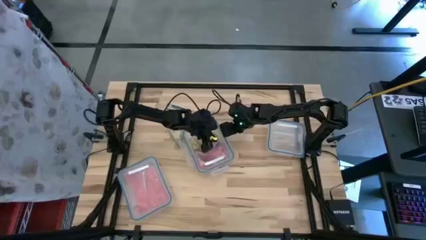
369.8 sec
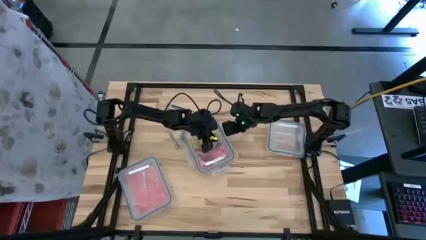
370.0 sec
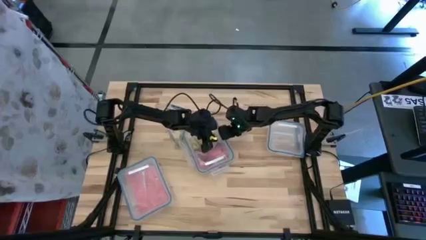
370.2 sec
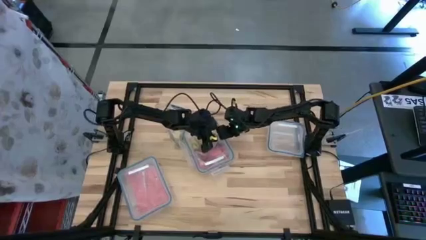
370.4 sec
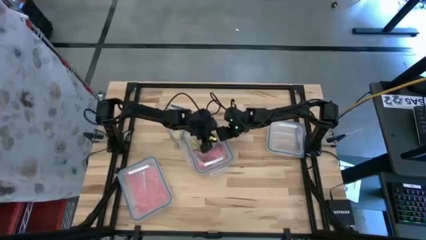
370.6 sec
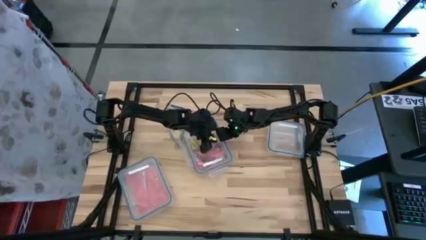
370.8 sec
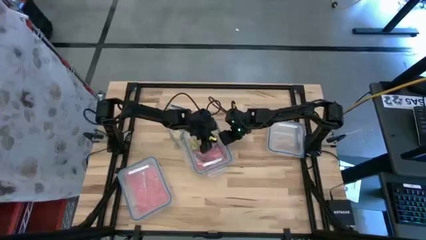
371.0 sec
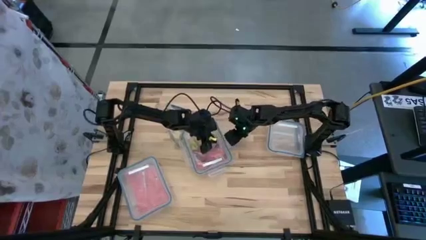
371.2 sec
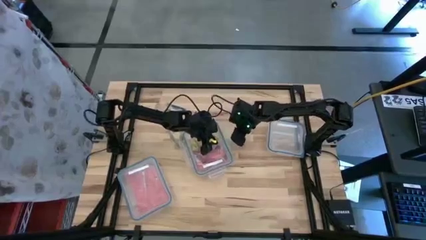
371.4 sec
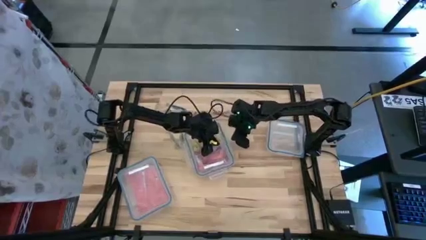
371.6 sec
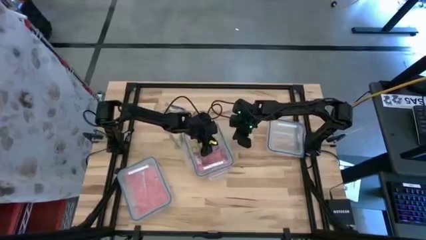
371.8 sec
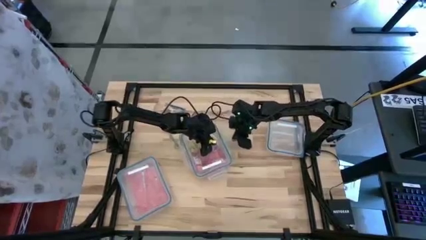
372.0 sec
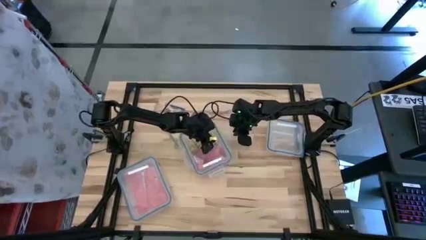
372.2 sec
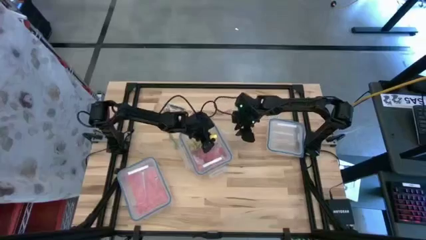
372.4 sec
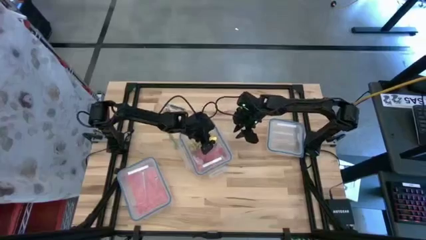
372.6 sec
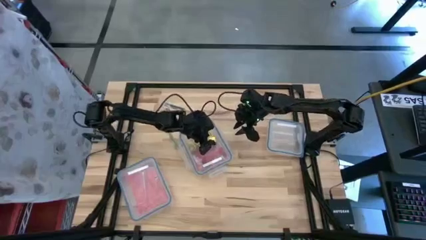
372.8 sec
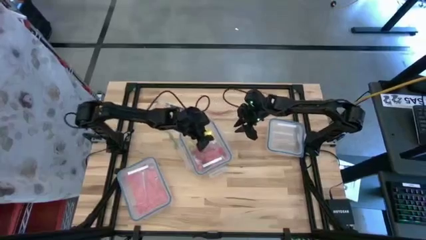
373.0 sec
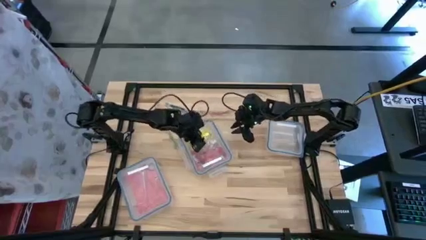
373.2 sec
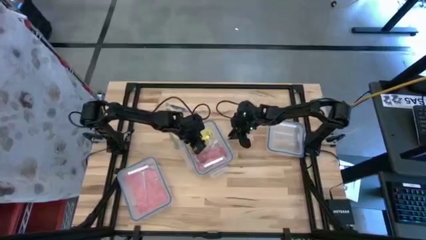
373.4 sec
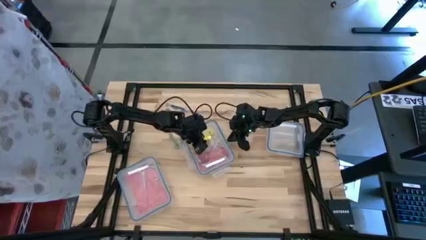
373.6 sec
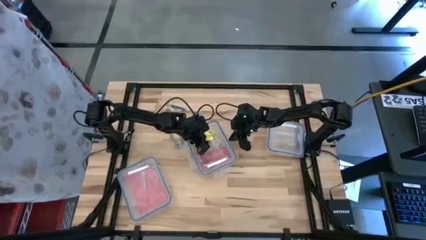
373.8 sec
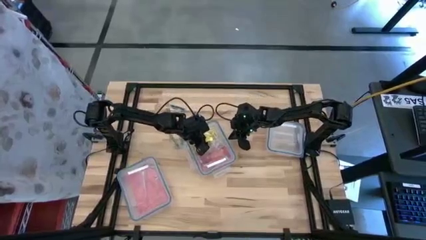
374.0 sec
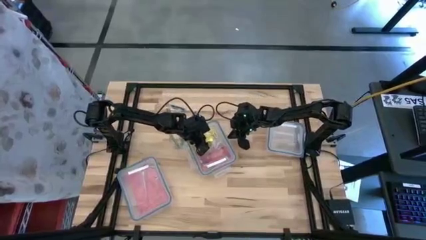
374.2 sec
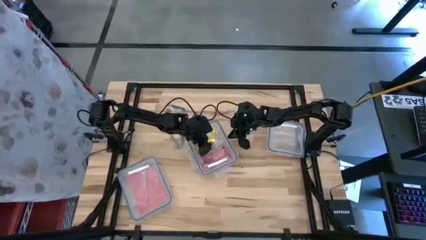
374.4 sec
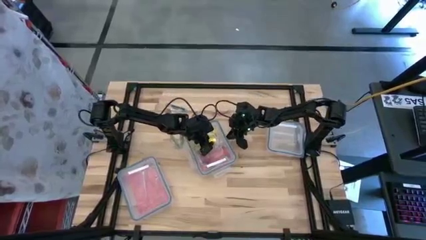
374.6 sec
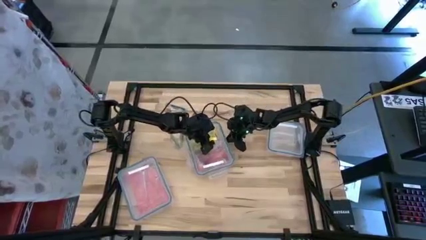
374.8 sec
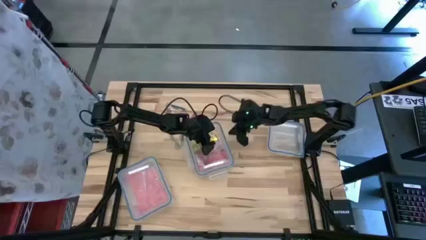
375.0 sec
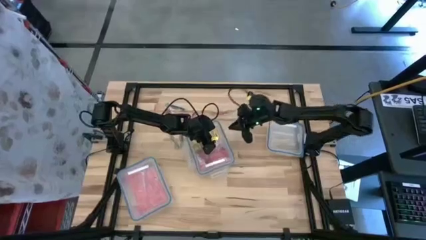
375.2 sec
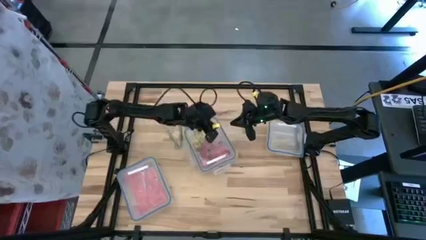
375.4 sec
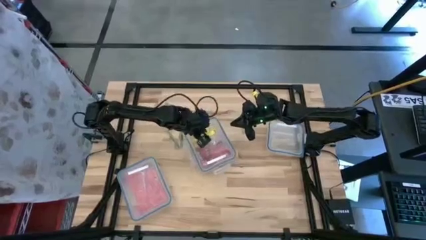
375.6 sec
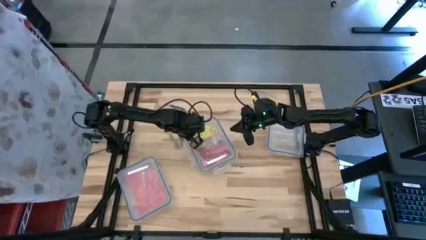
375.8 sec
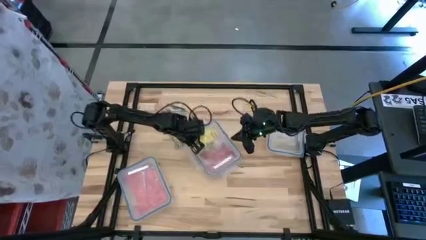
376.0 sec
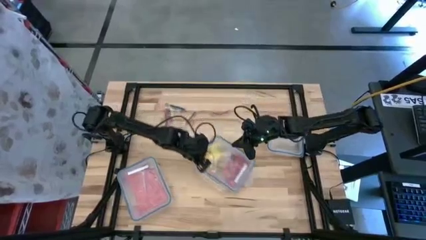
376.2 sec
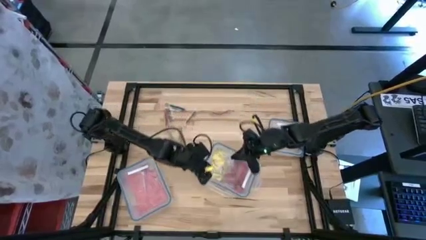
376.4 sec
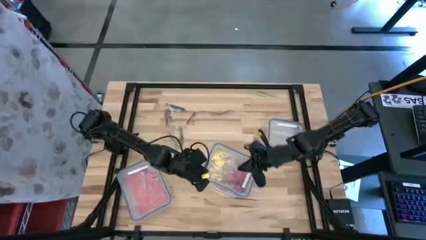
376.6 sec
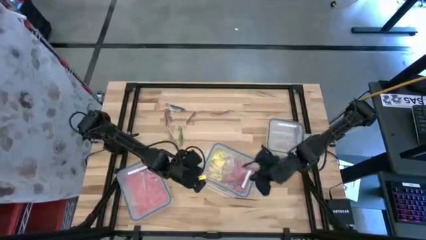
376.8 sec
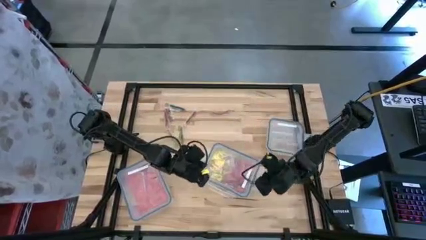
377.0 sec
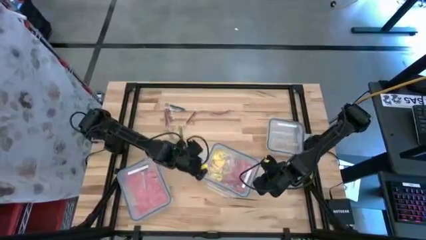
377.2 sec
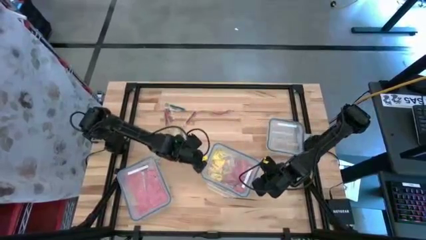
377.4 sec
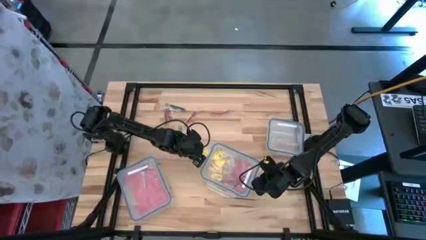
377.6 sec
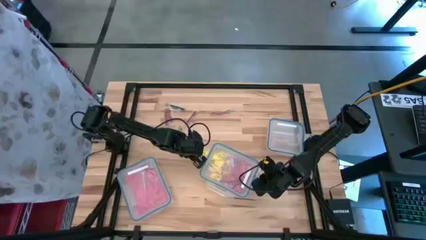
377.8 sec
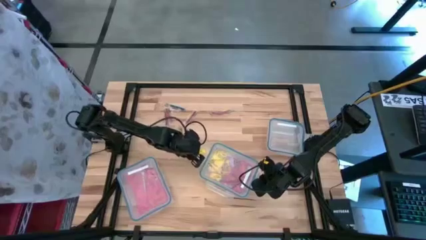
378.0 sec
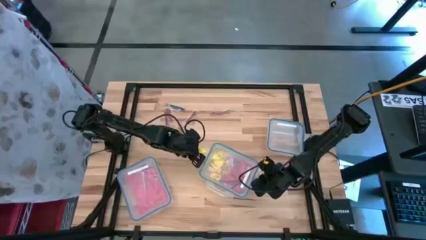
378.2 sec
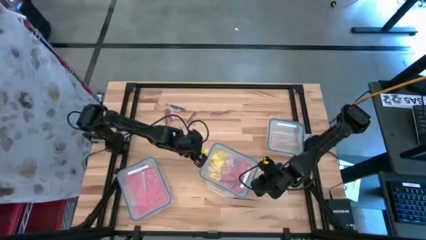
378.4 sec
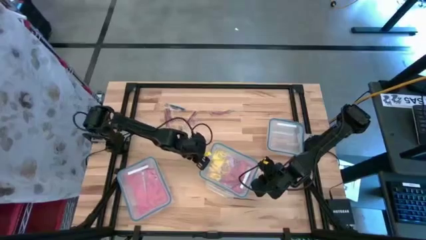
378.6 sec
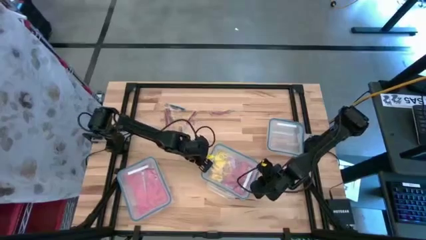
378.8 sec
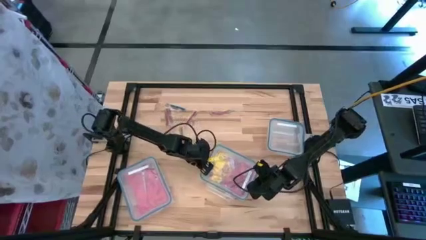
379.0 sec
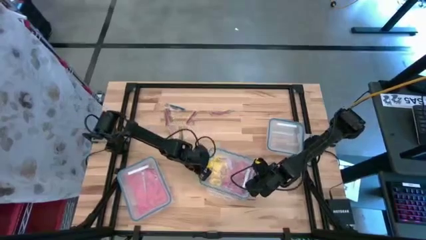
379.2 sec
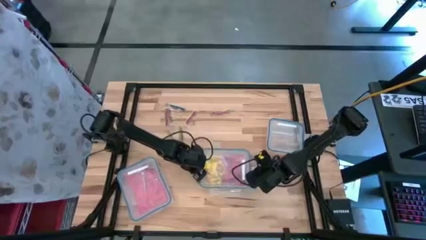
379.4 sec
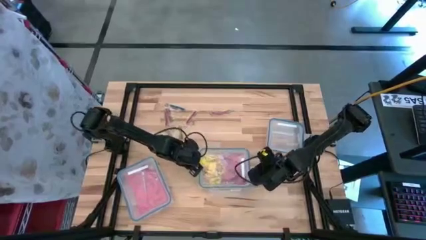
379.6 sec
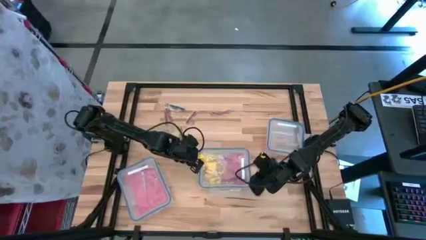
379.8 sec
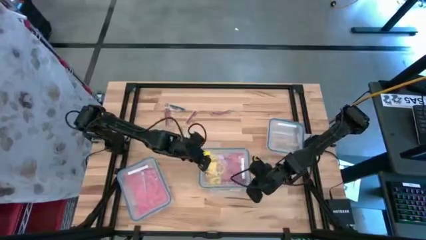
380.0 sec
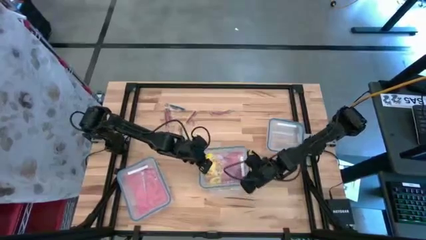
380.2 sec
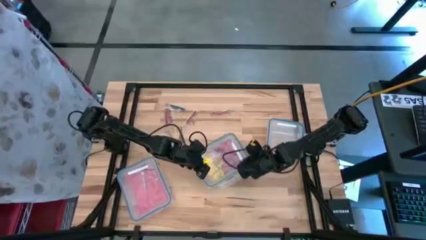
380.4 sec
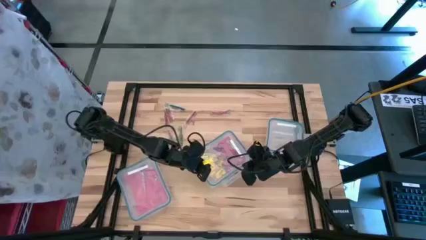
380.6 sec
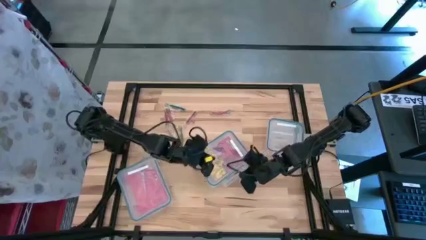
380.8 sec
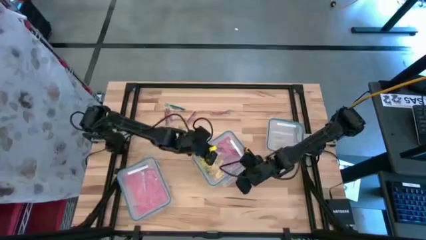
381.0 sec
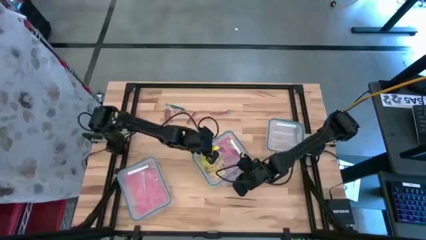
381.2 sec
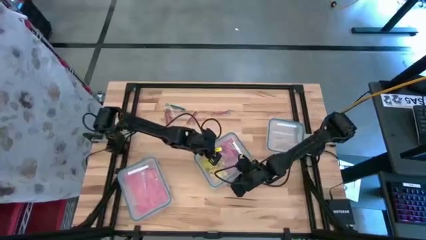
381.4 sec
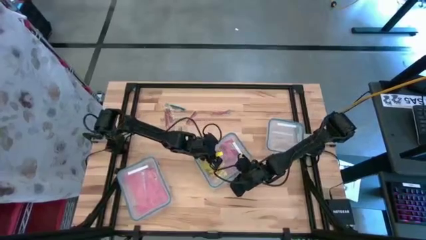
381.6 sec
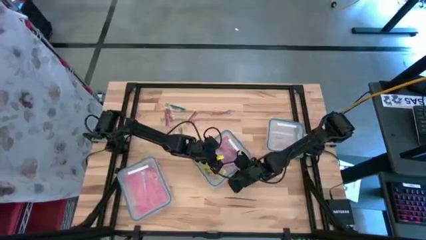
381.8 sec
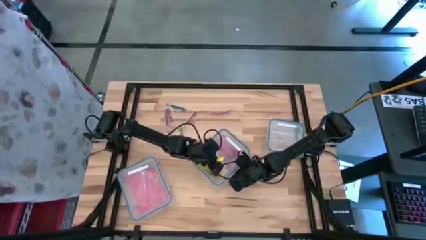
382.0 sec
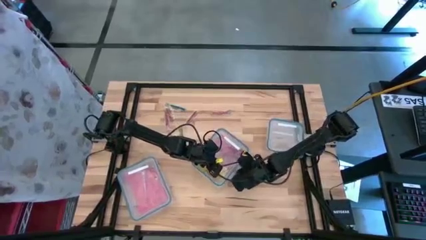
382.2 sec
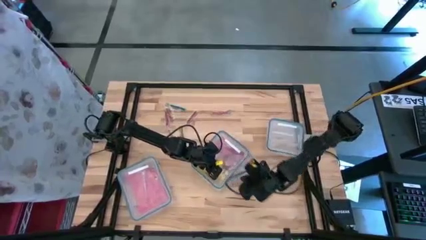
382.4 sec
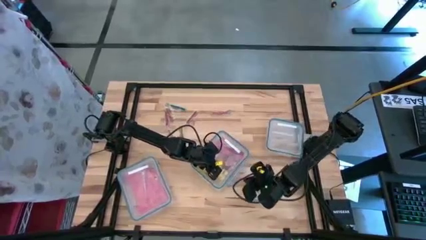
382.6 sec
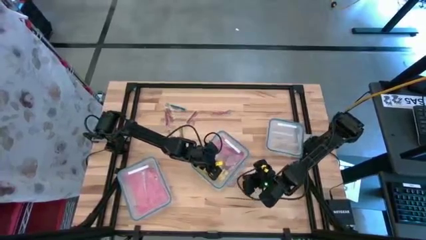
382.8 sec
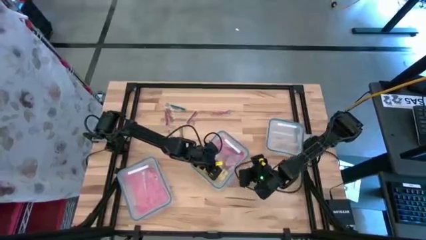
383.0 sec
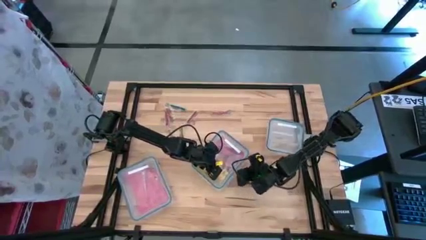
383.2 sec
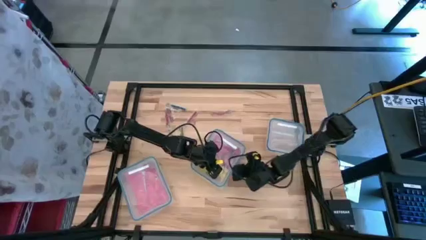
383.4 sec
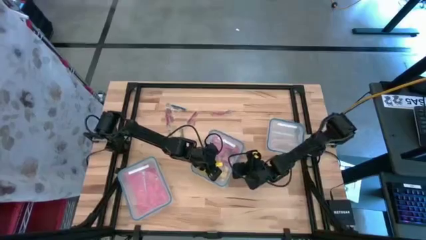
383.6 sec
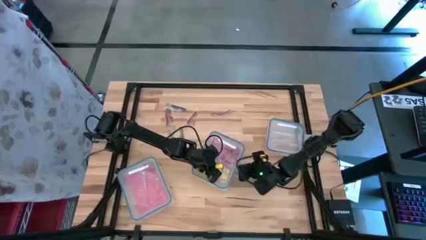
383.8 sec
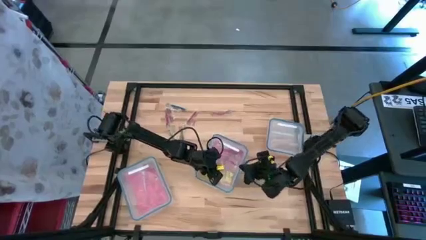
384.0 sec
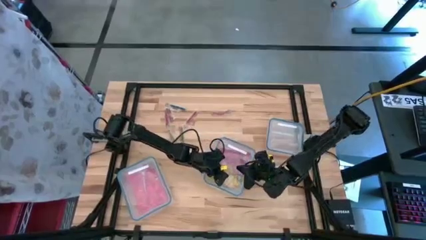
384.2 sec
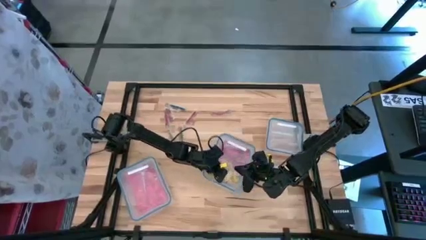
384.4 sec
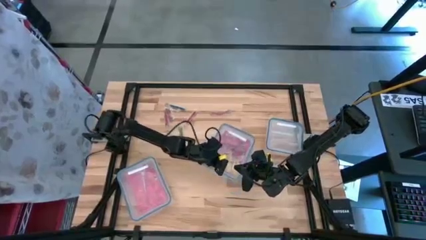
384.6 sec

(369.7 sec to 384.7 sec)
Task: Sort candy
Close the rectangular transparent bin
